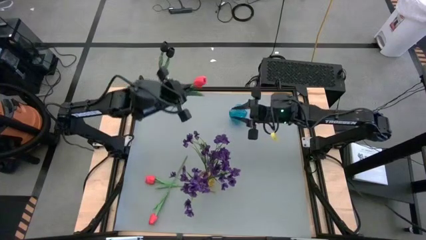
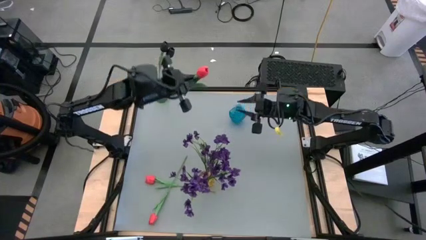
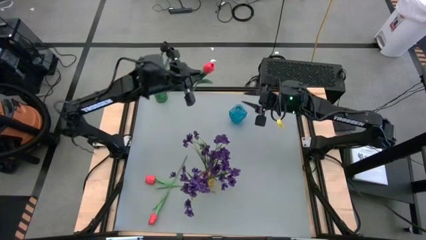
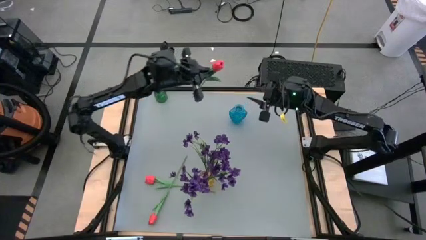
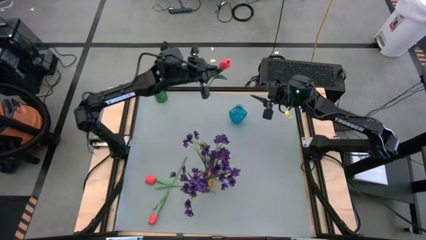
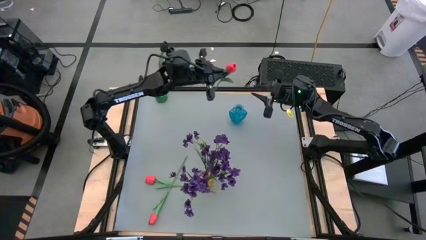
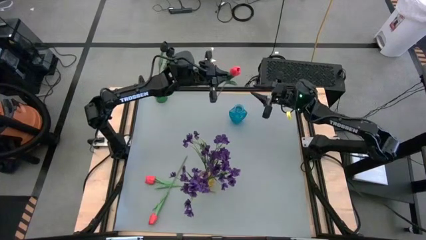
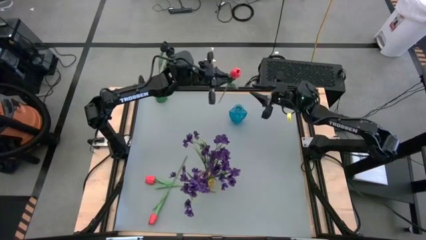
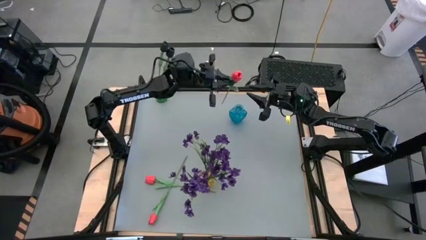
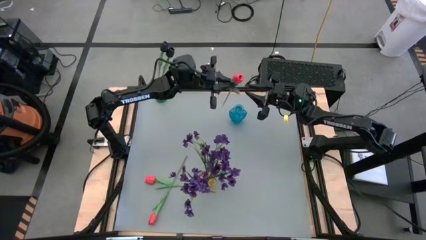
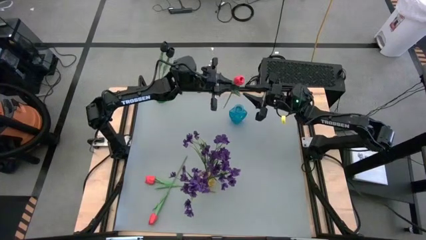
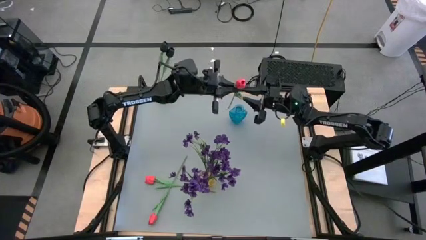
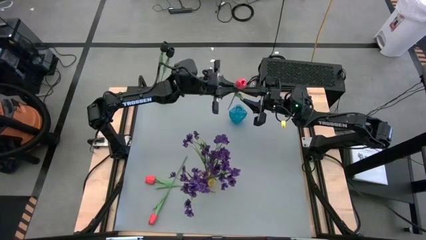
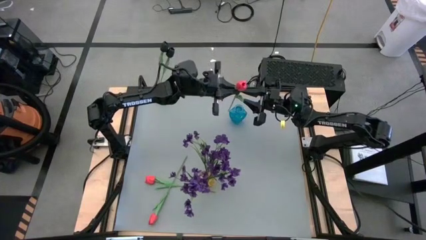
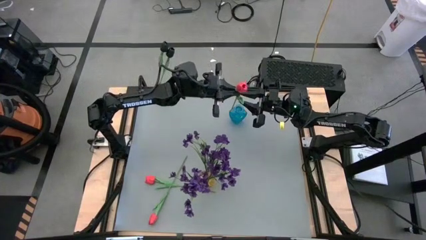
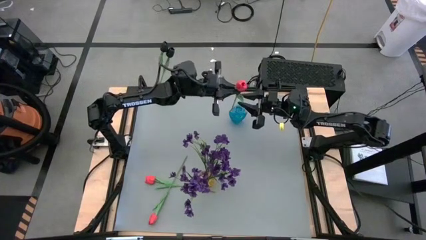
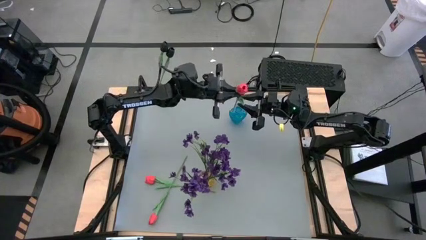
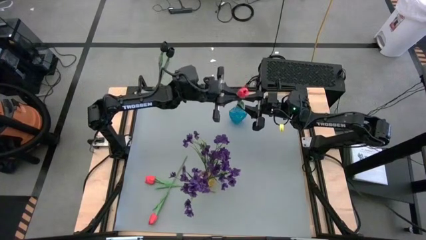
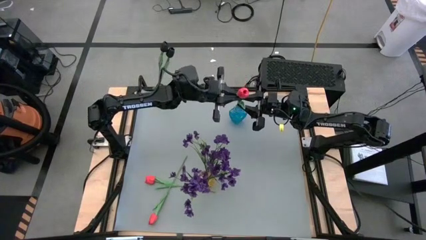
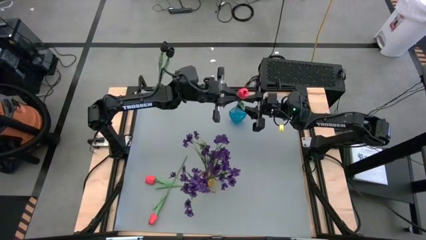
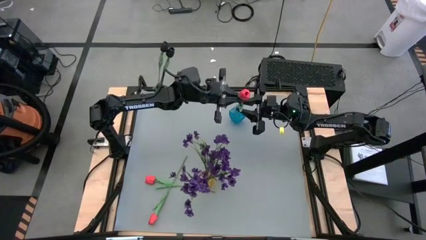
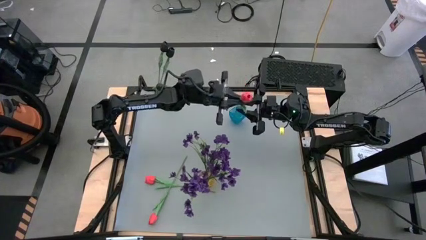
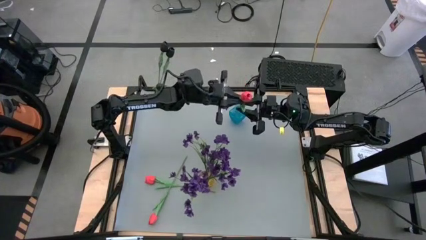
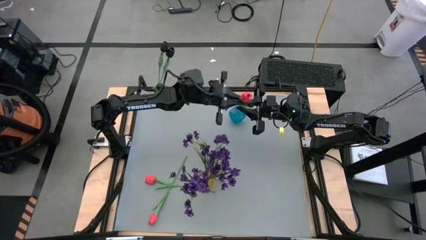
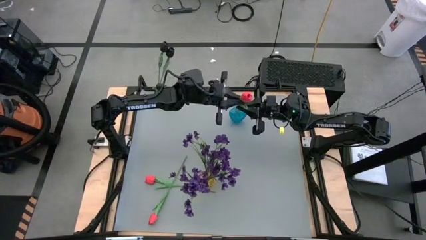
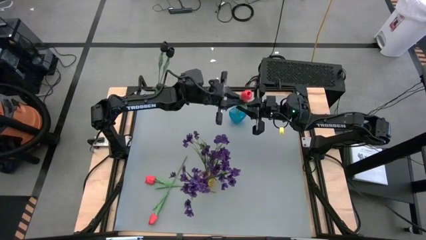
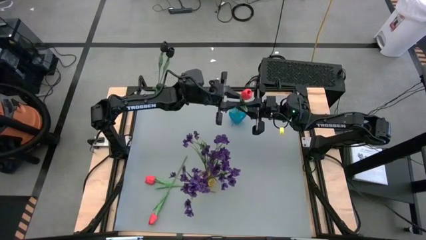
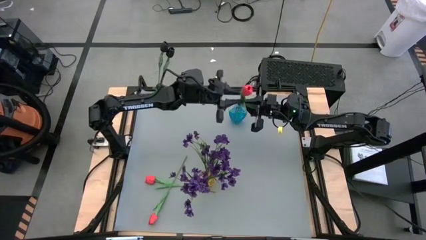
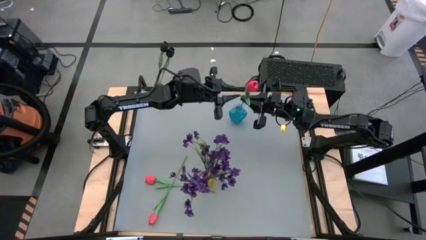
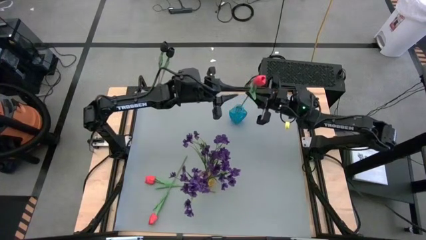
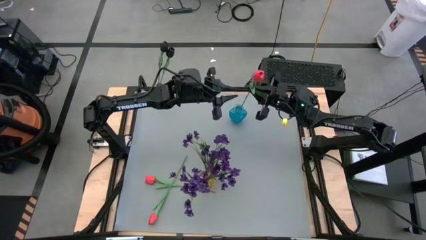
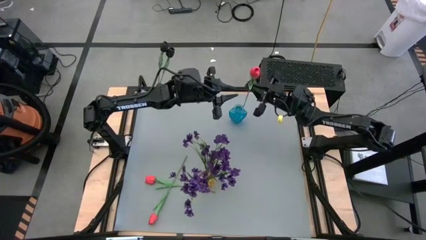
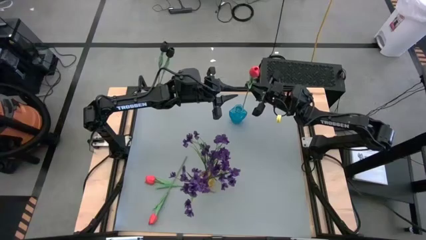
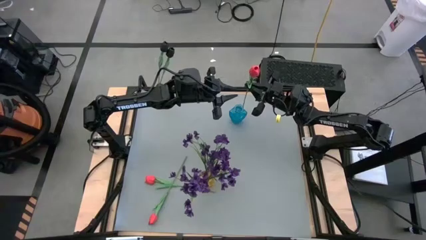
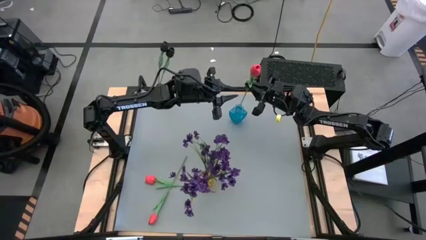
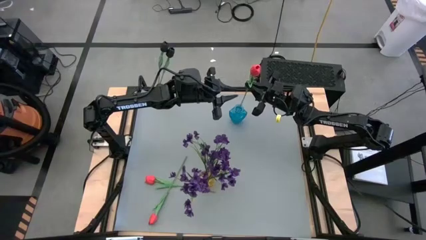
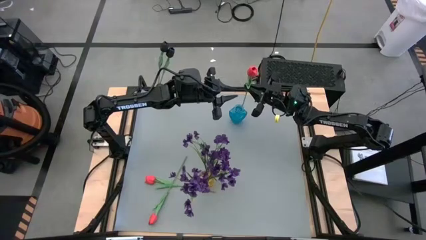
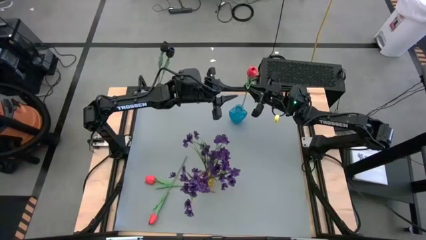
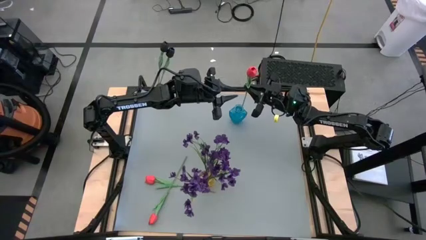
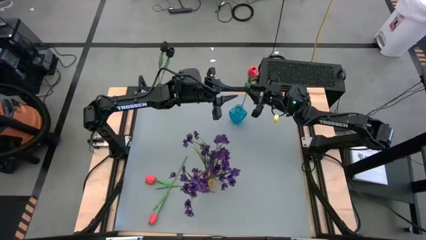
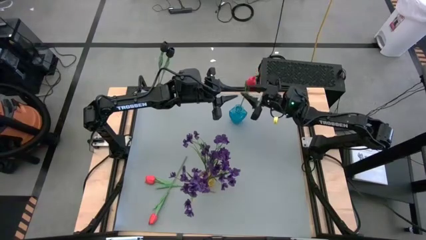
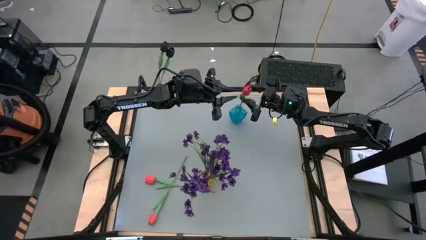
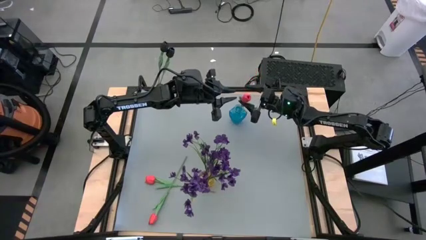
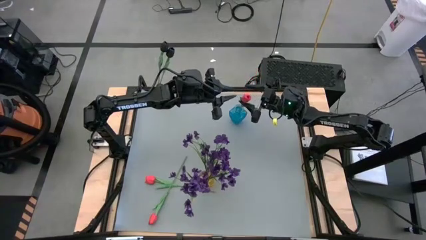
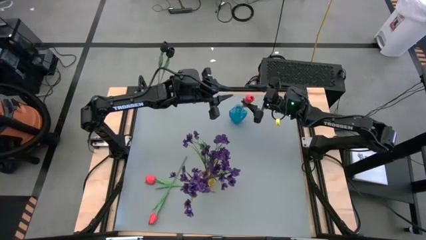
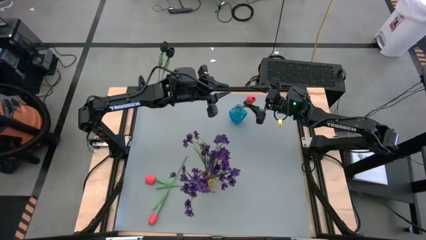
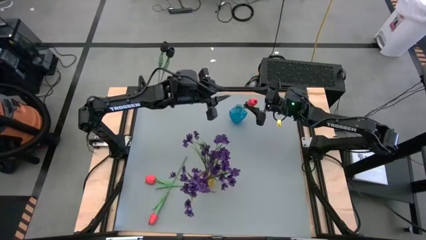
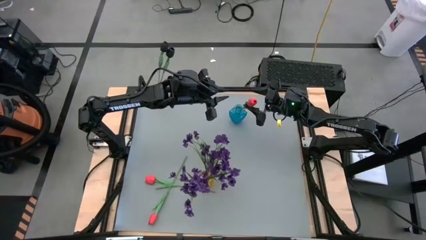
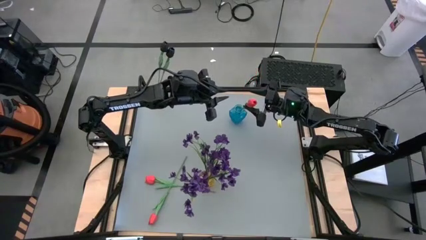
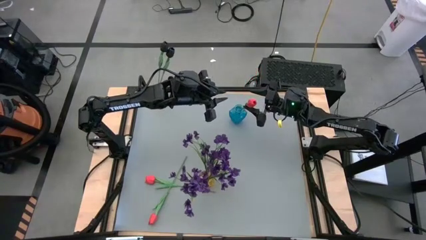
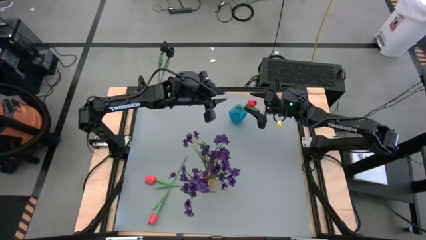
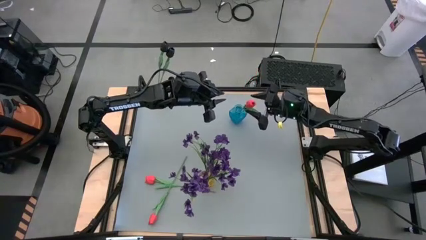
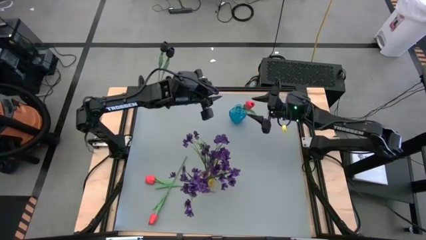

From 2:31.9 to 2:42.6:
Task: Sort flowers into vase by color
Put the top pink flower into the blue vase

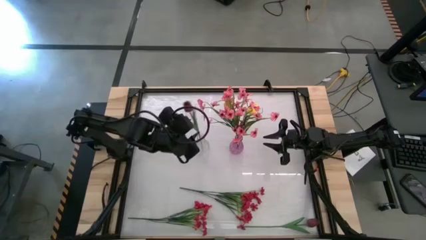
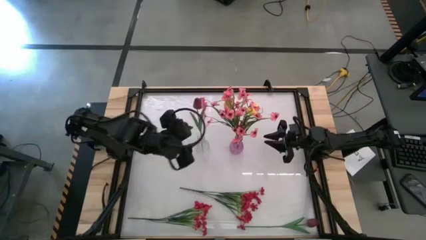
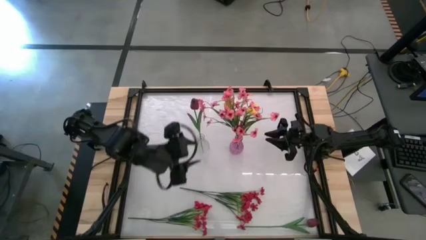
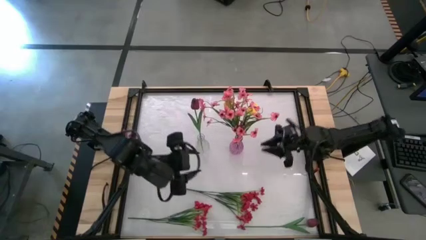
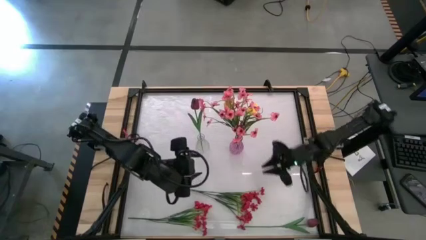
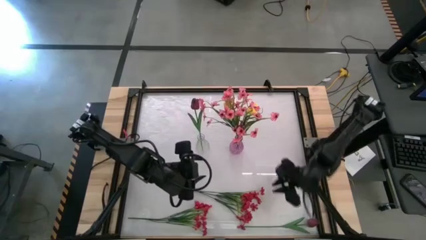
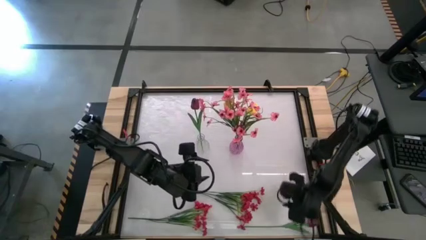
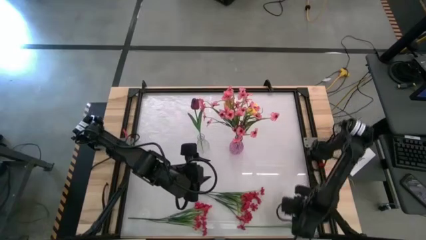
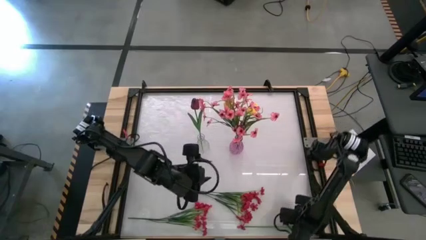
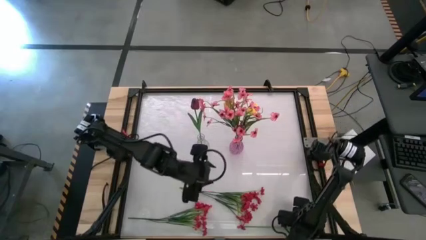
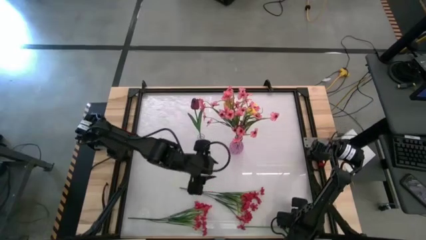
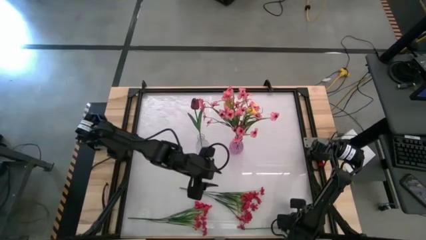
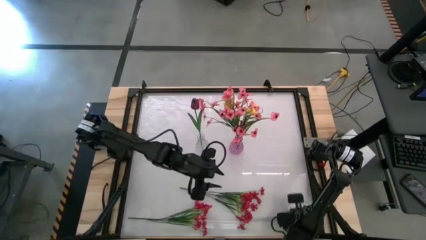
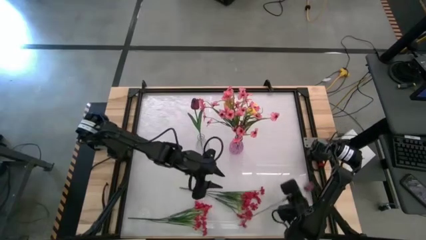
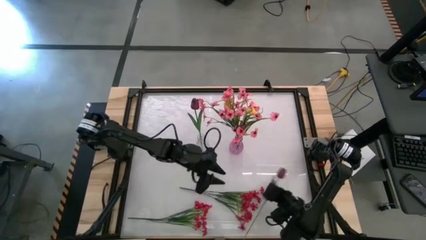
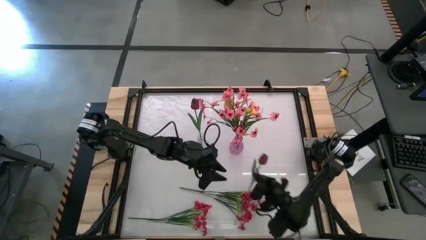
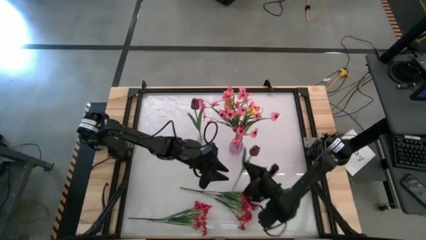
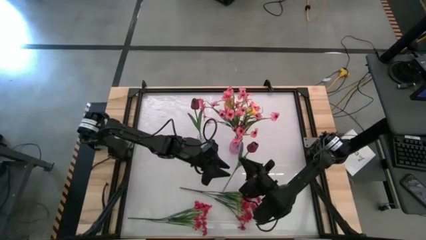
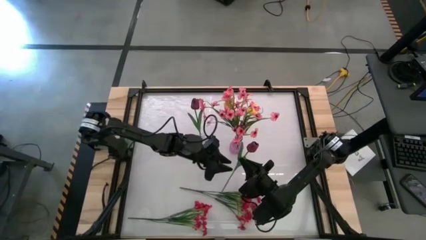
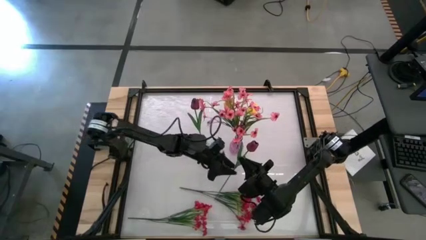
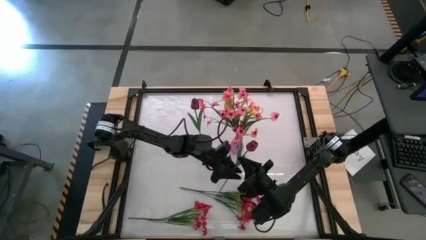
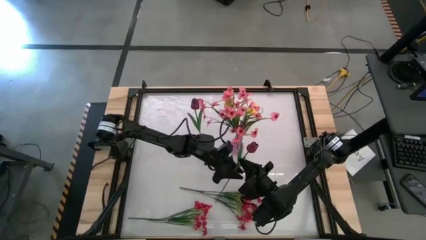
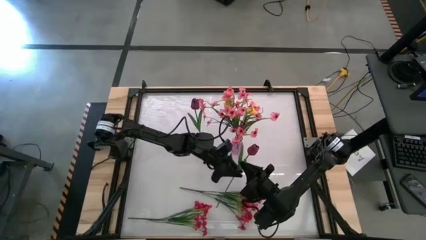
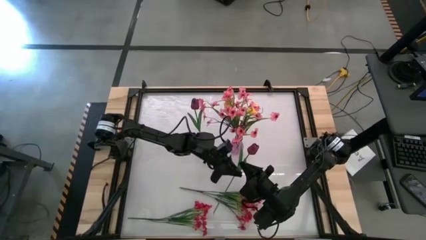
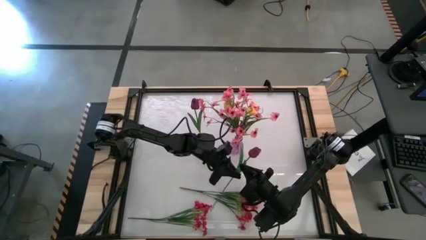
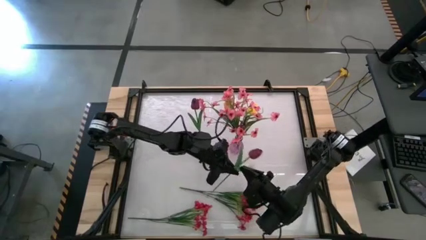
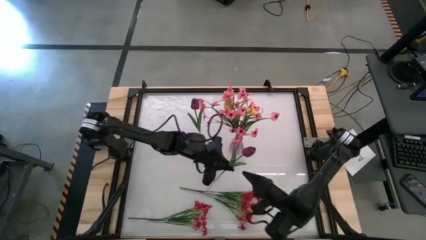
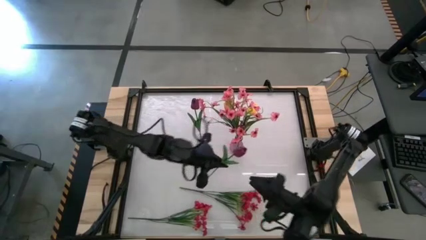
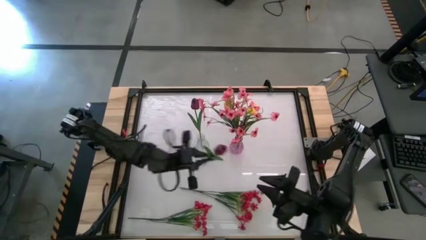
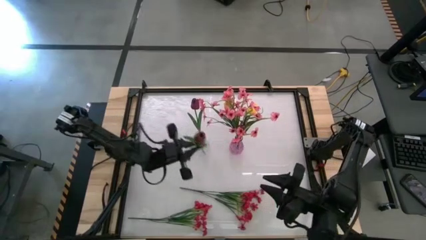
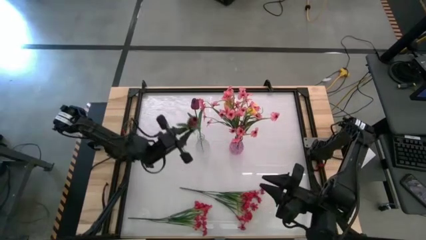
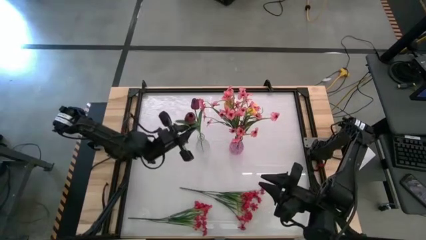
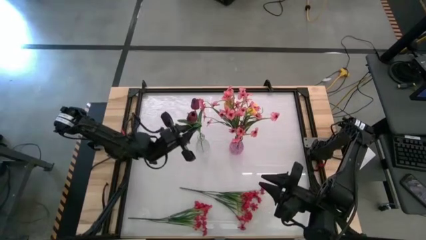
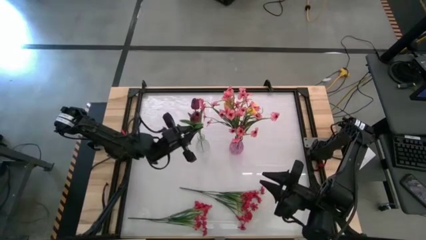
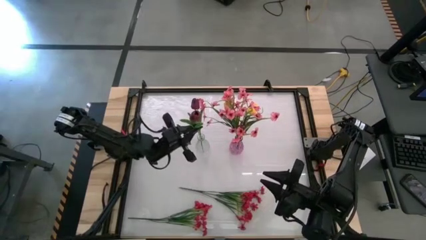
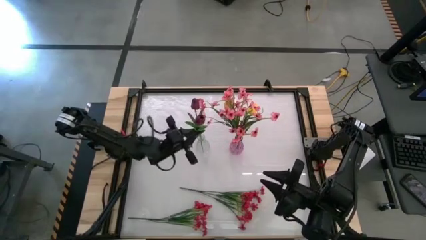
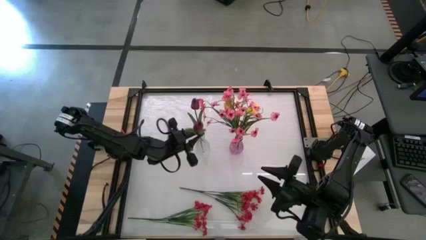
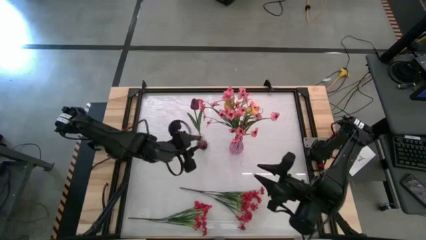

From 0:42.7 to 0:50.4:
Task: Sort flowers into vase by color
Put the dark red flower into the transparent vase
